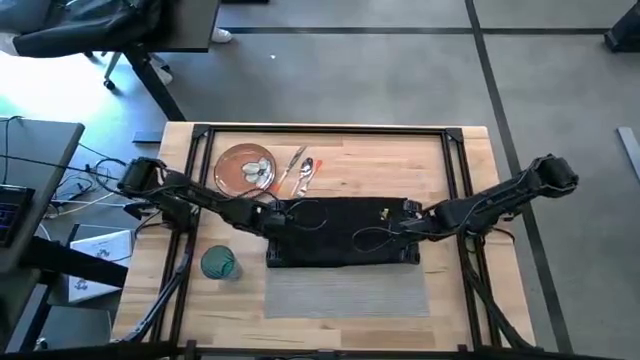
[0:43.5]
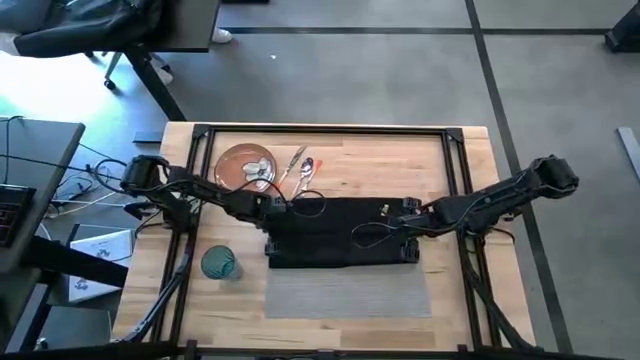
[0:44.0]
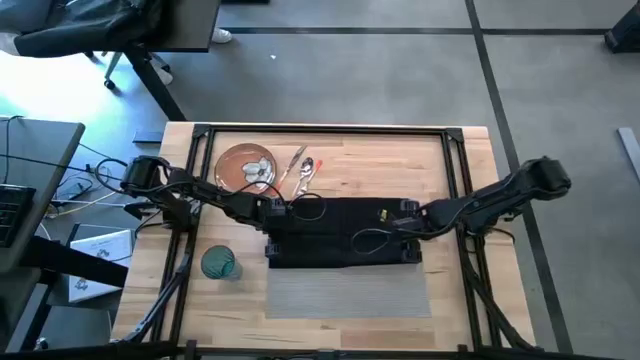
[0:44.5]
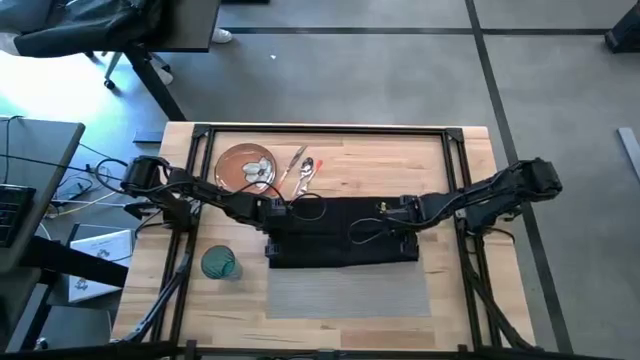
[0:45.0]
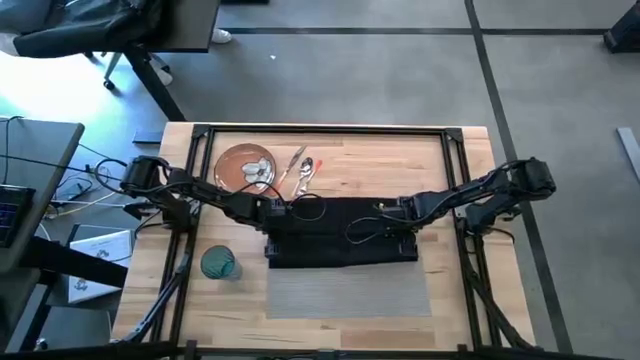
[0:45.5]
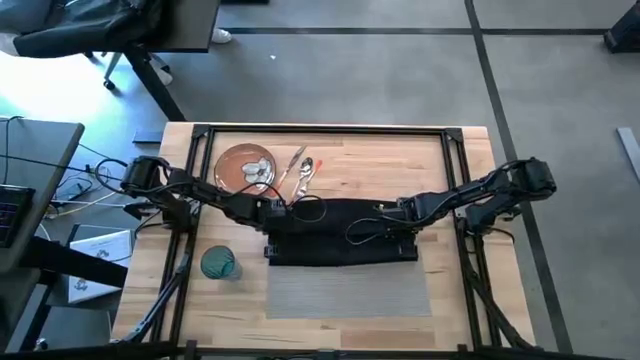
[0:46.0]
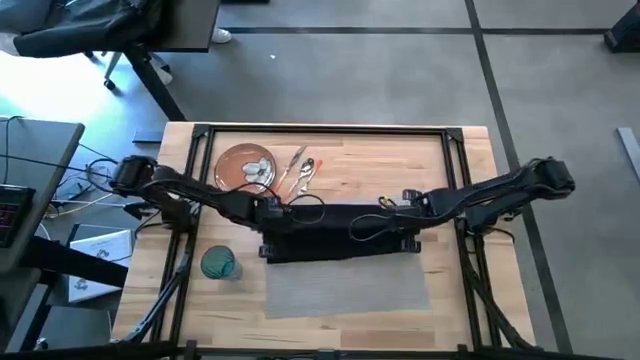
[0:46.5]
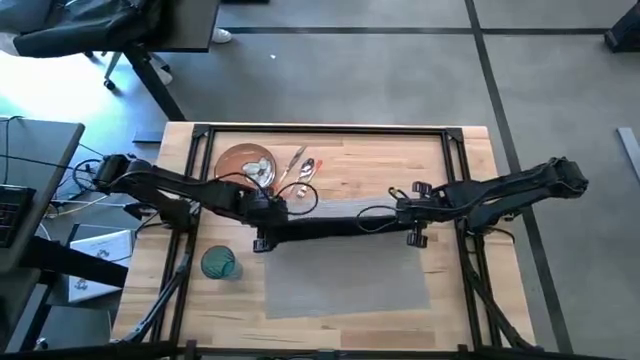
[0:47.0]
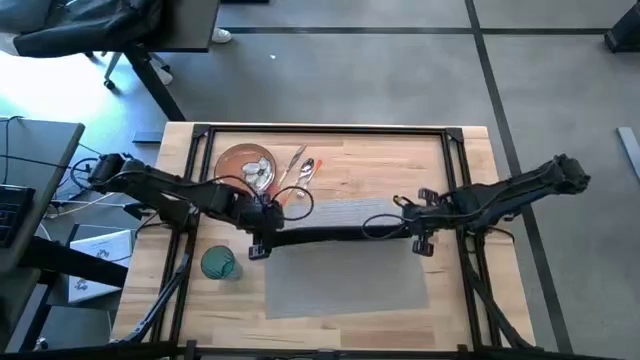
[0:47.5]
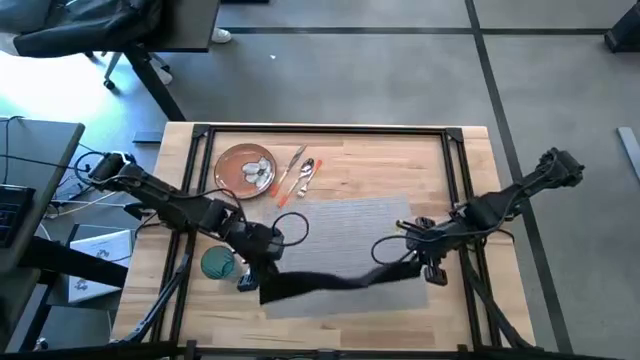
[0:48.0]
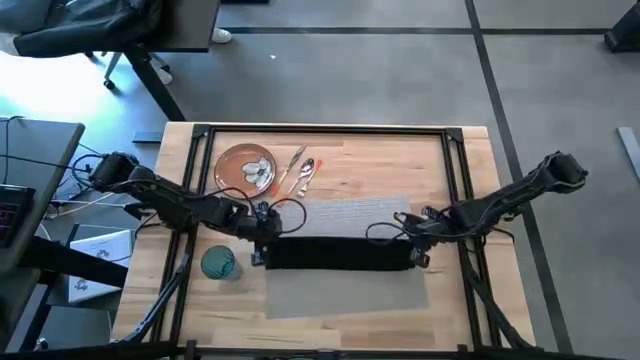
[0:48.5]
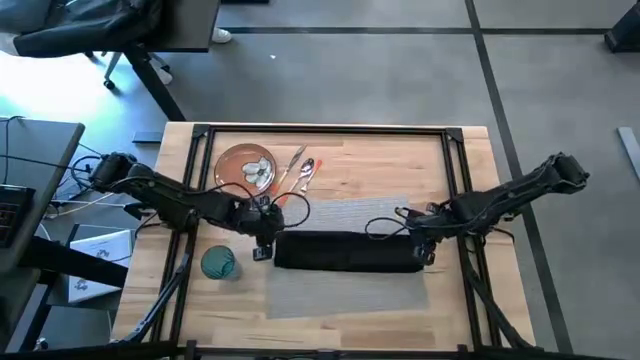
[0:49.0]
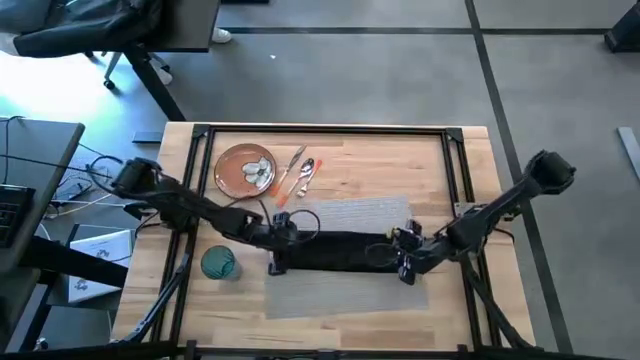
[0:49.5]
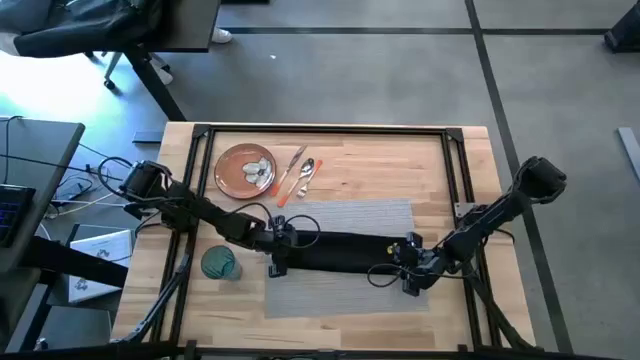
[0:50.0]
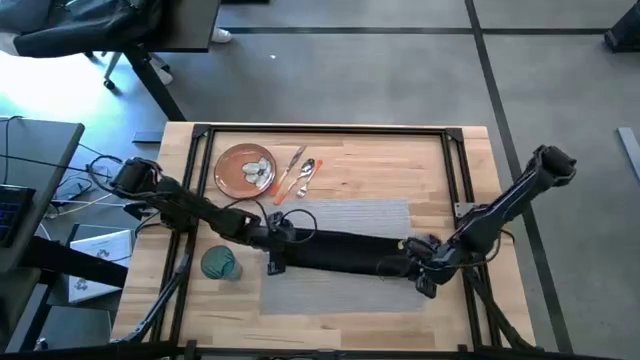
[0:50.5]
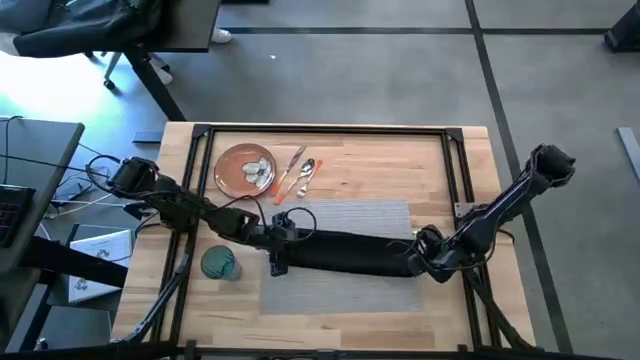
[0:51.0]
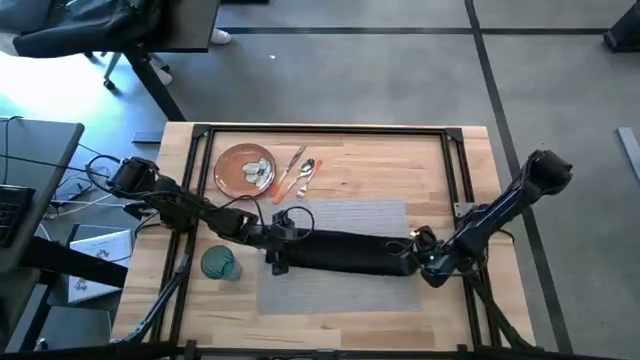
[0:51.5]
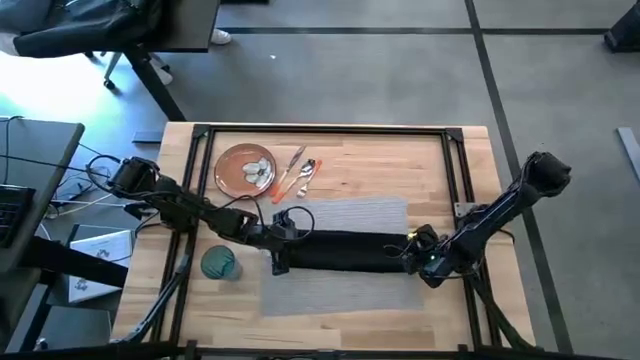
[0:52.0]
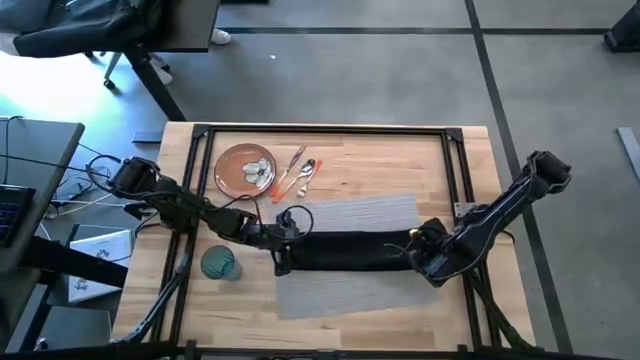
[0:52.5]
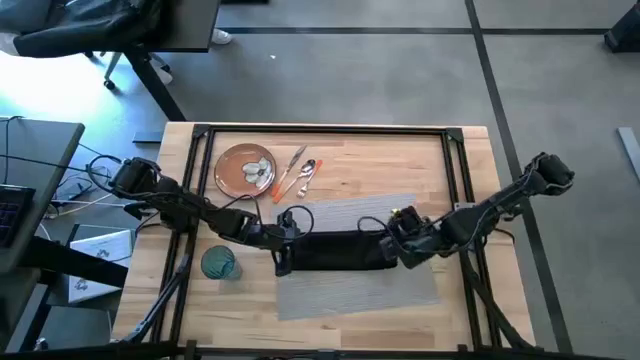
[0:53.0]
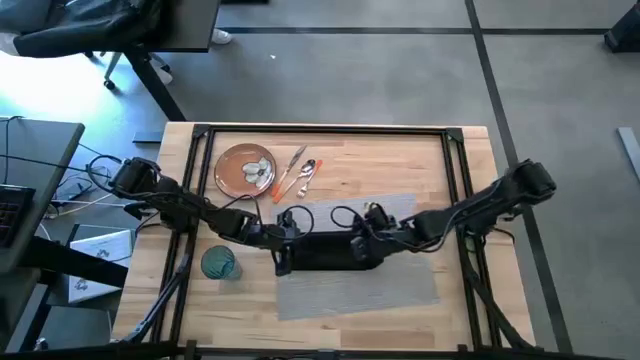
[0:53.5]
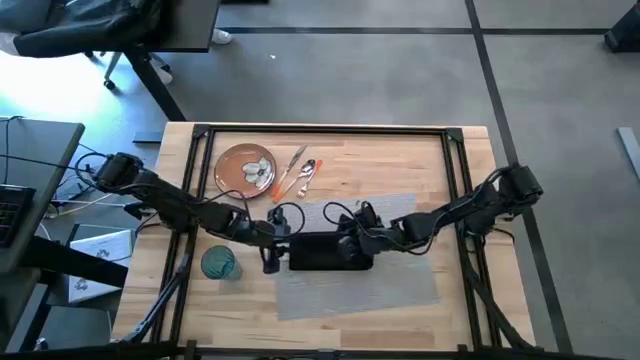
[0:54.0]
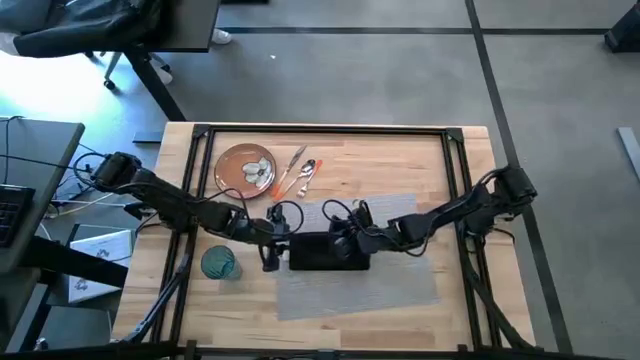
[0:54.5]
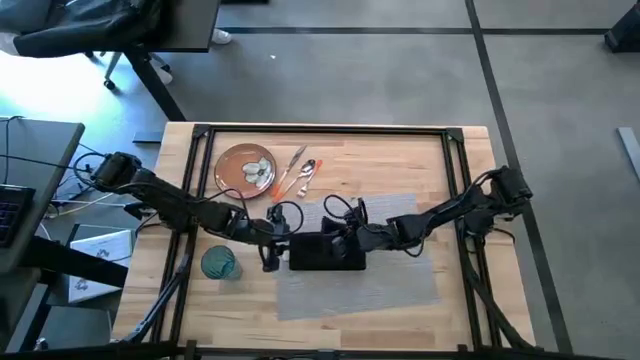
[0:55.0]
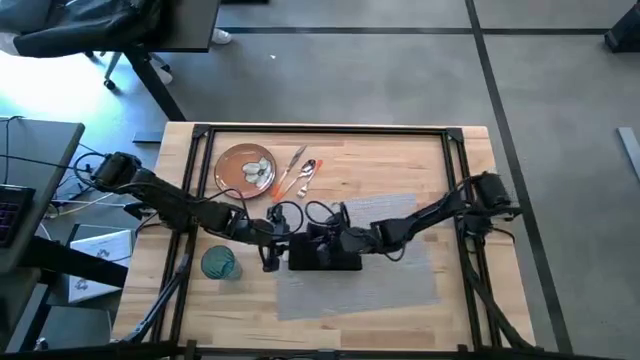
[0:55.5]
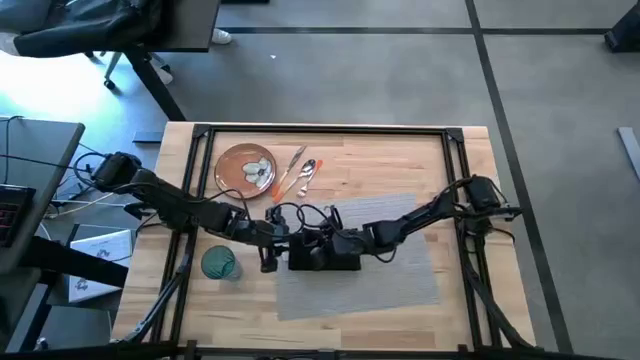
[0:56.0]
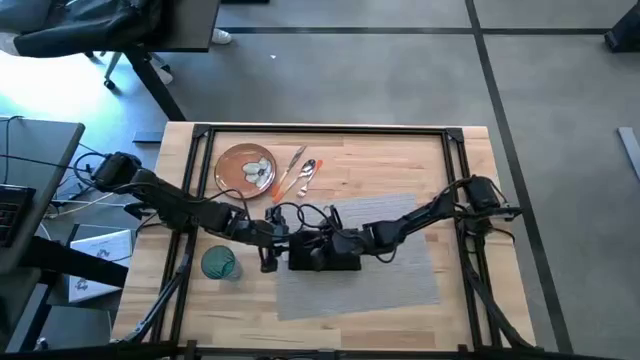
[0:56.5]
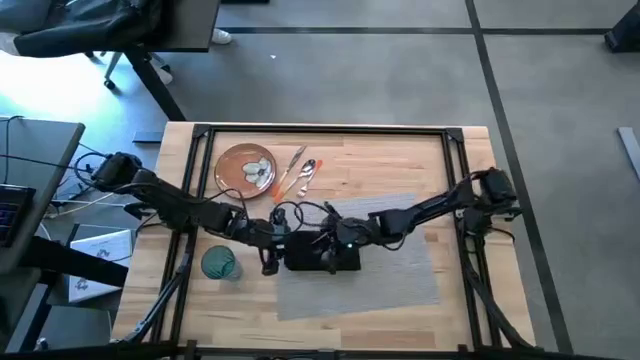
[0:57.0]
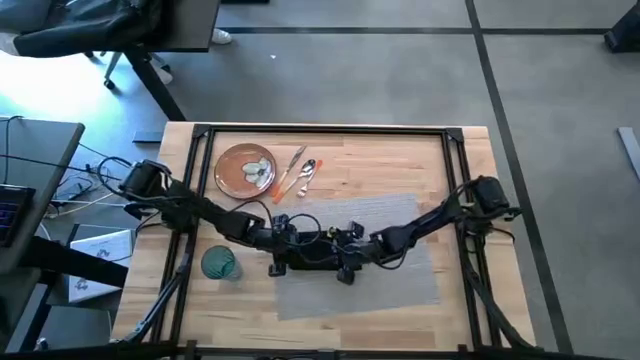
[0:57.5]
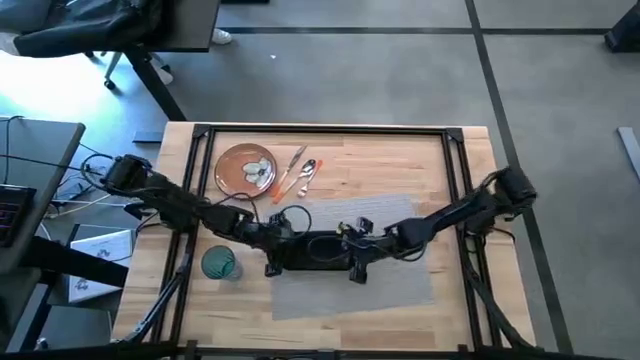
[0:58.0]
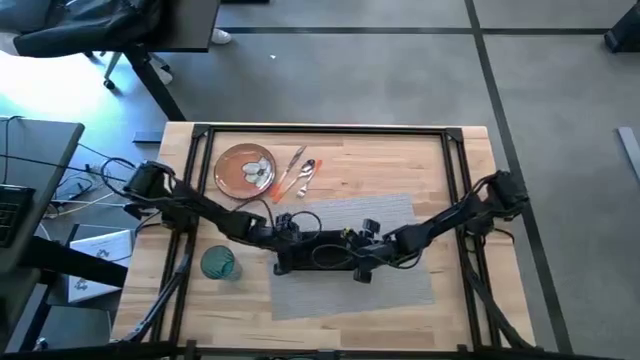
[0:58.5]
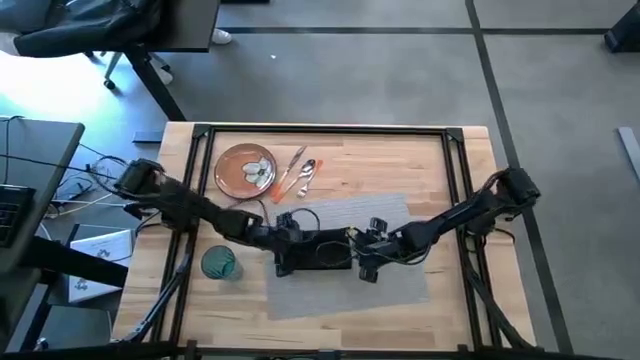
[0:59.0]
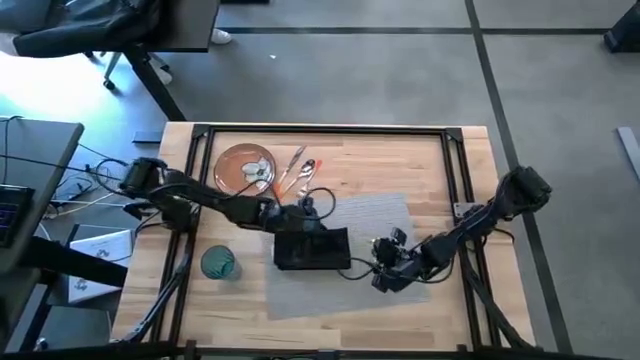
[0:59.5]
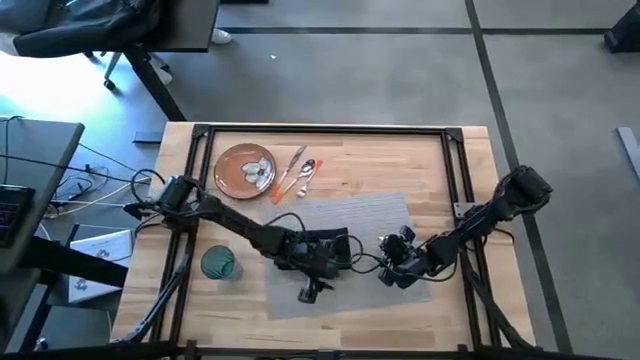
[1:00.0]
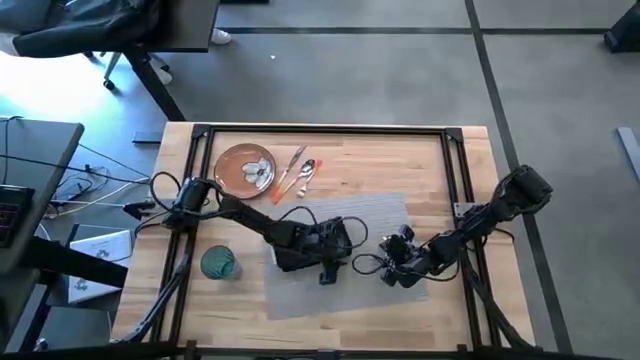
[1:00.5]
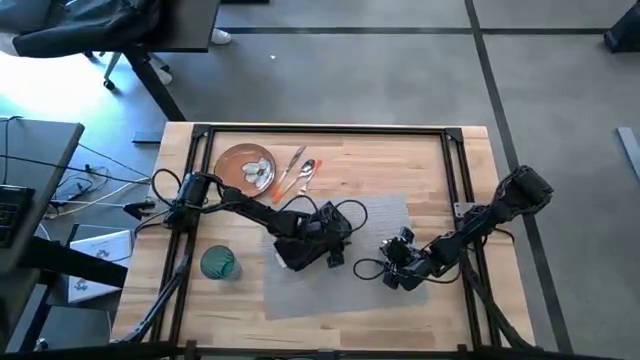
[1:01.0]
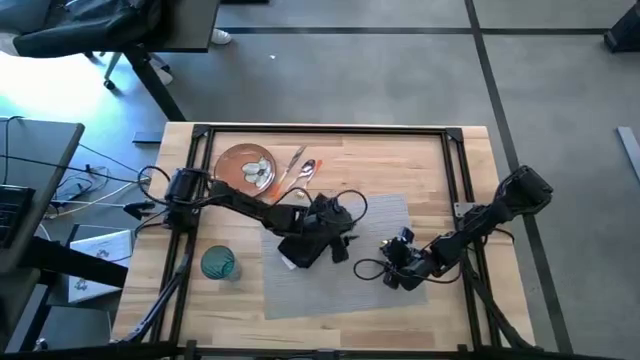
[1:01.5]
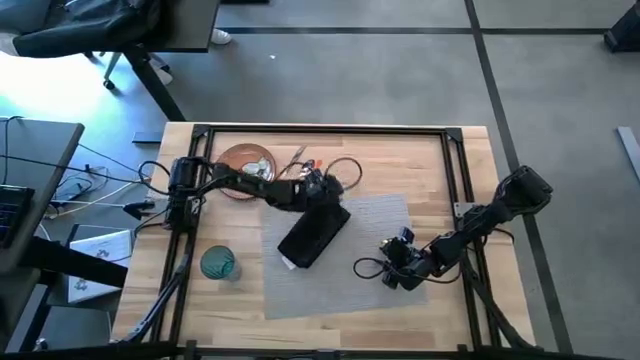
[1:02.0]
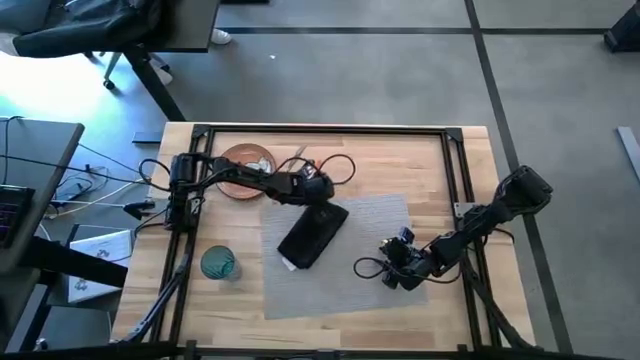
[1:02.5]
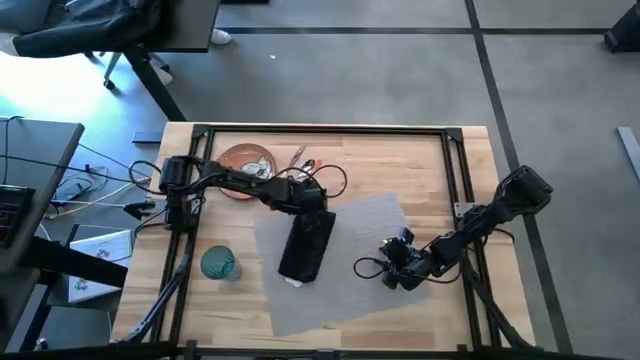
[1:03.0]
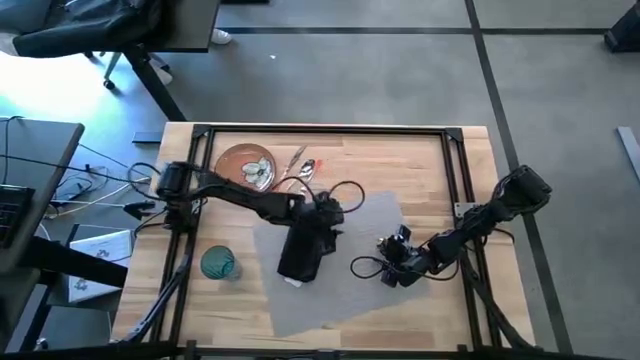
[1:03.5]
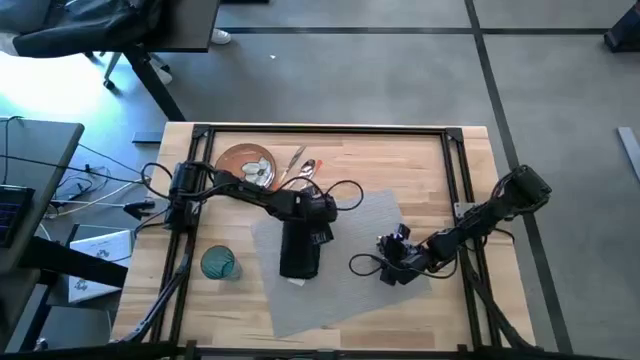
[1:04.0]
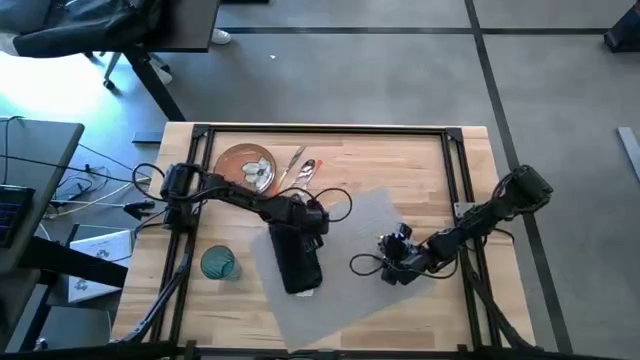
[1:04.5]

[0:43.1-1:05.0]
Task: Set table place
Fold the black napkin

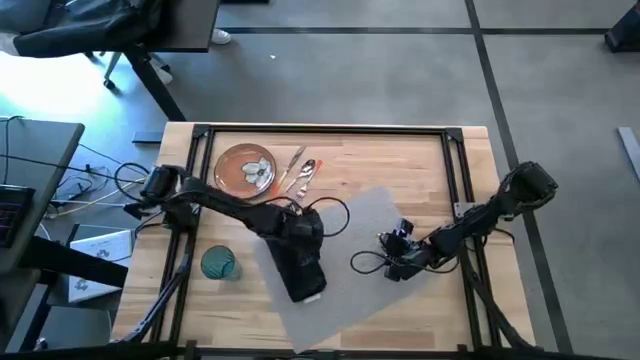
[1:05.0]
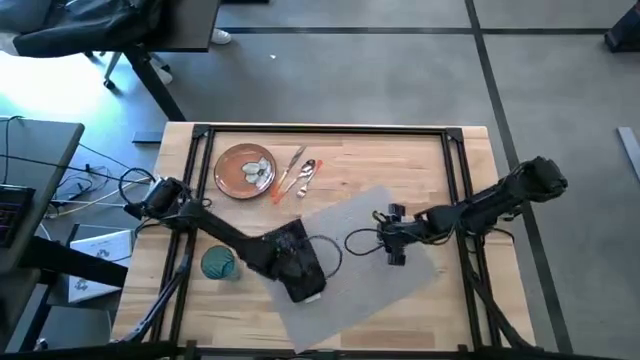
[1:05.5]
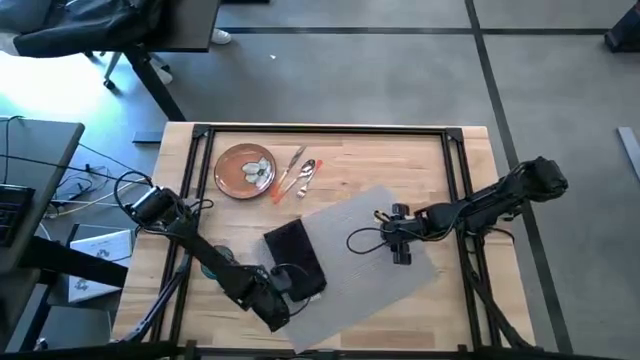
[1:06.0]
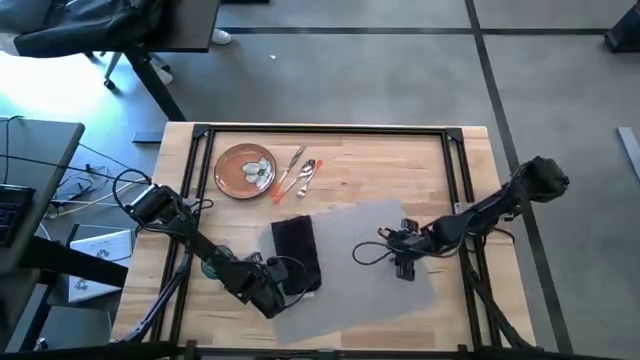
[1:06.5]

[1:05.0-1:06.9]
Adjust the gray mat
